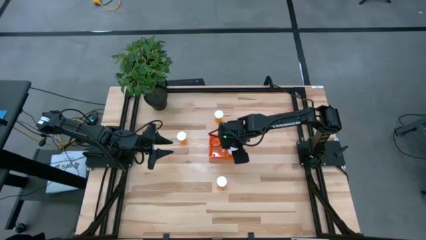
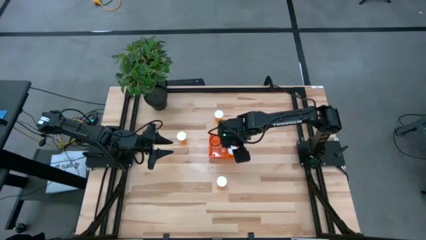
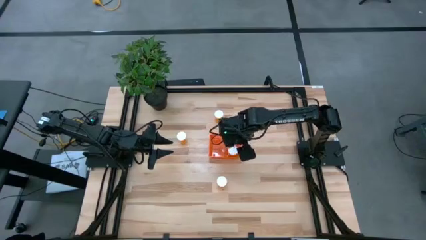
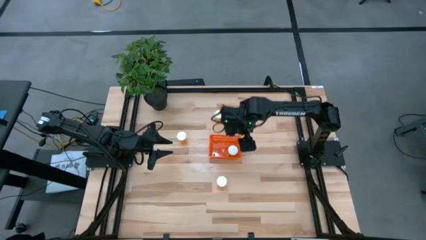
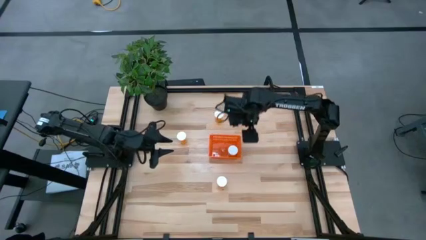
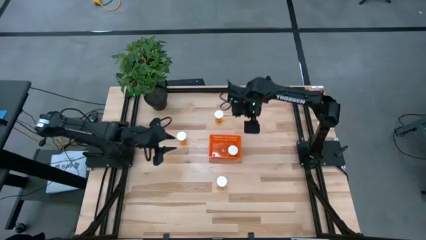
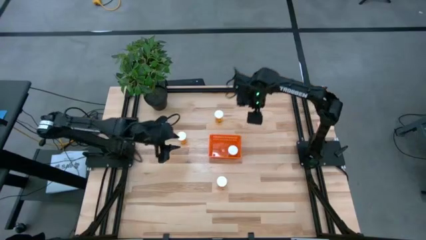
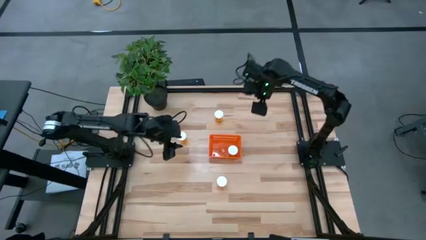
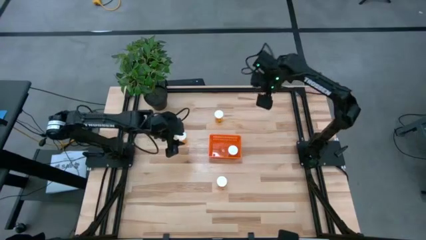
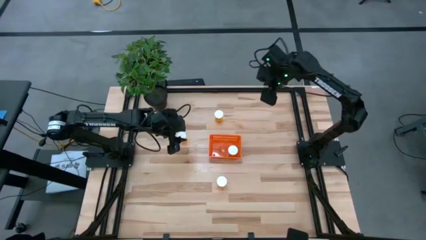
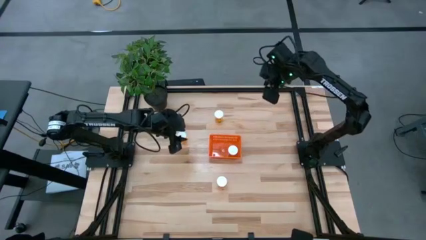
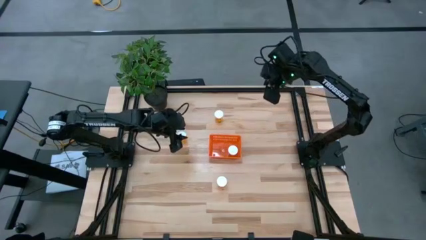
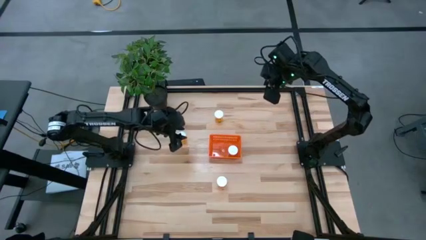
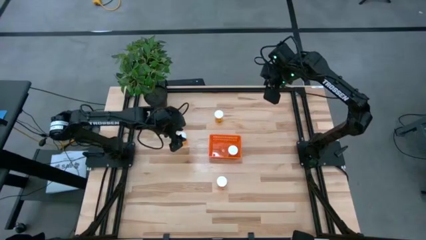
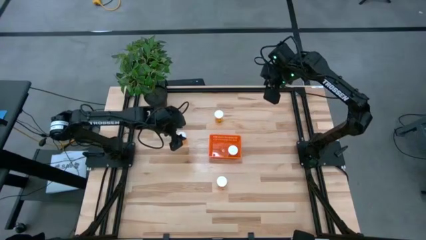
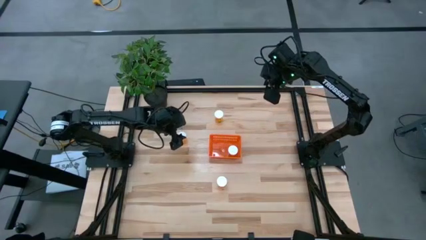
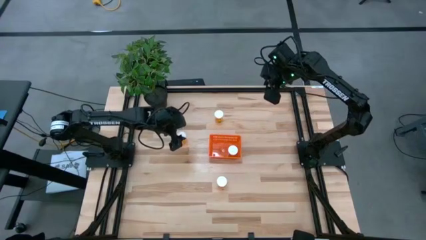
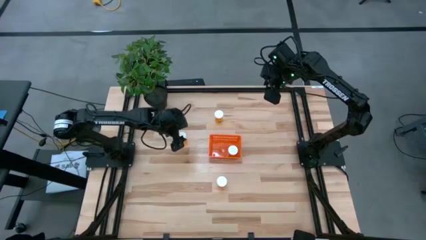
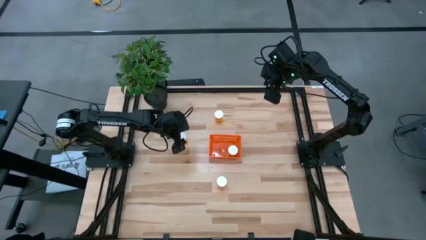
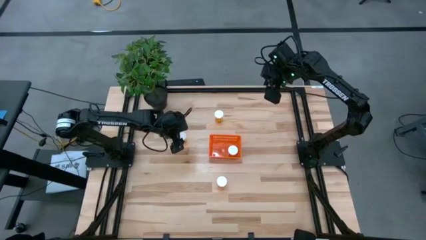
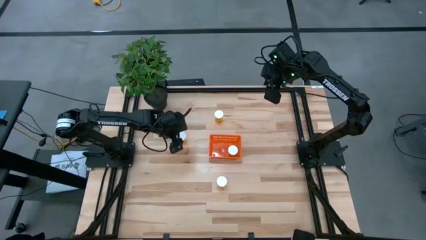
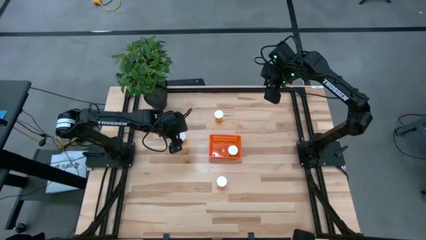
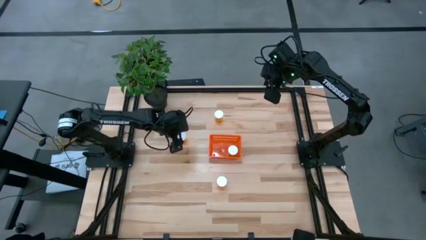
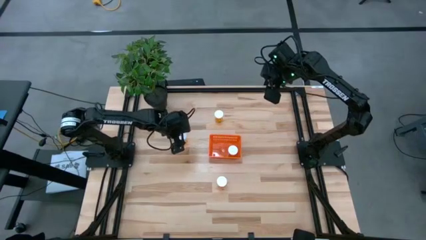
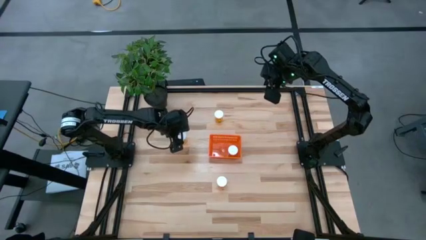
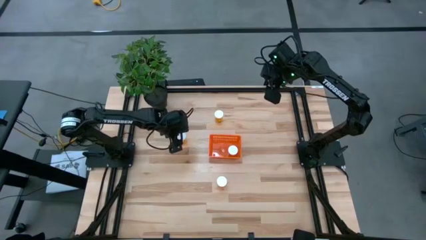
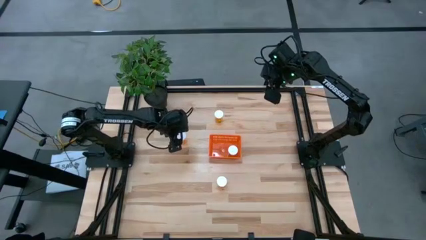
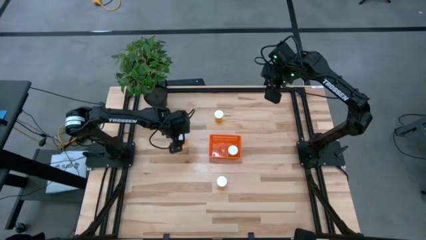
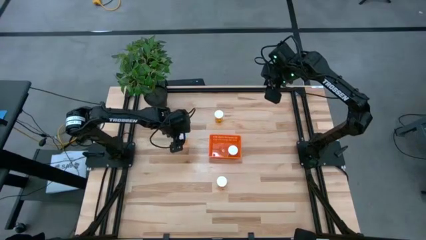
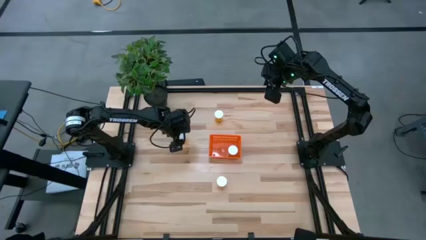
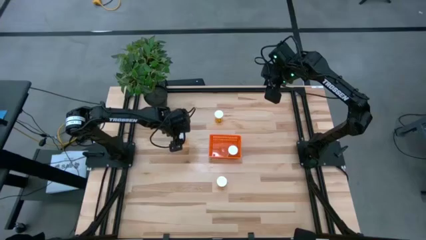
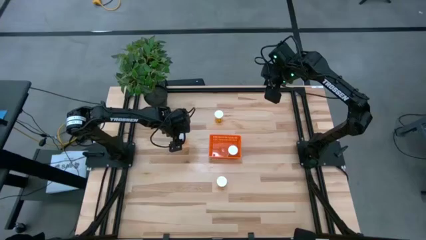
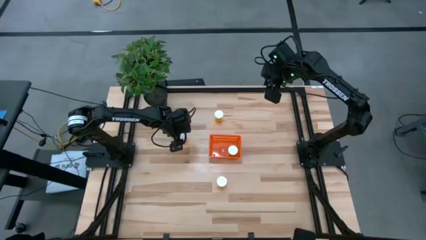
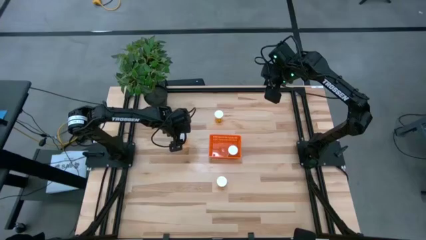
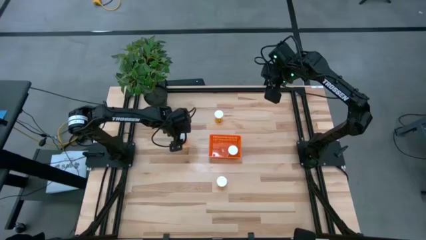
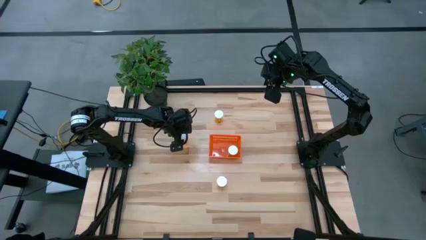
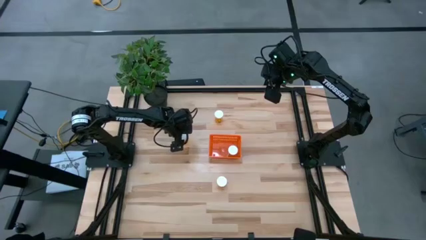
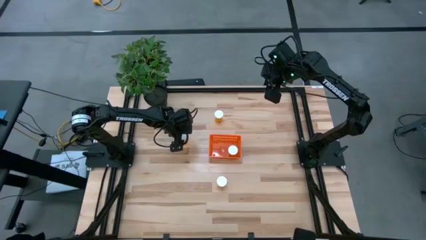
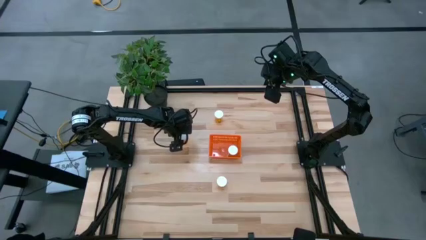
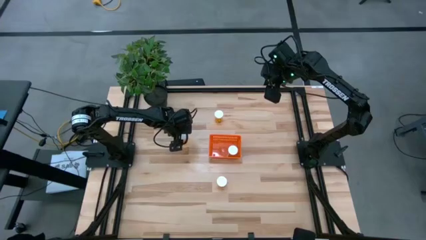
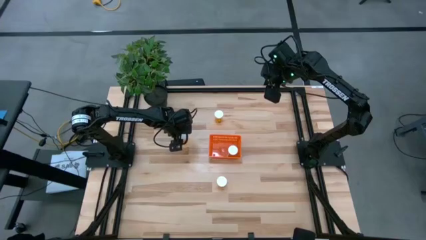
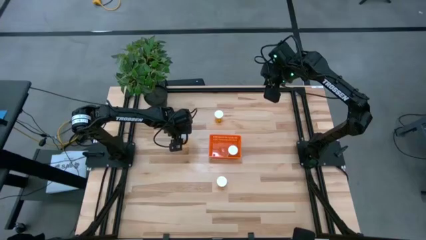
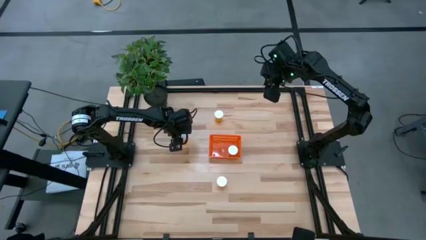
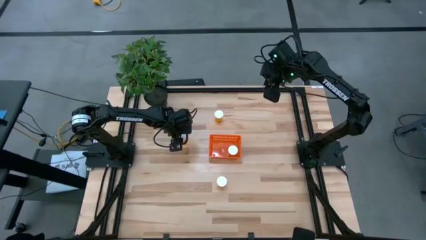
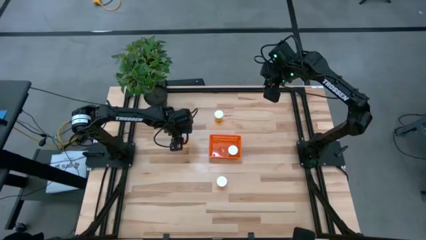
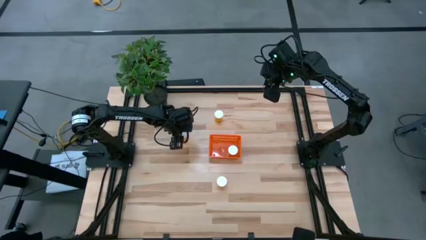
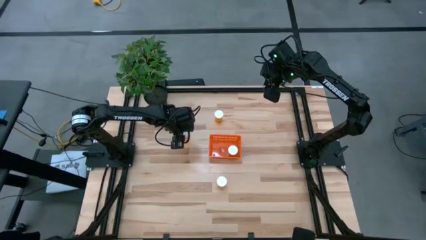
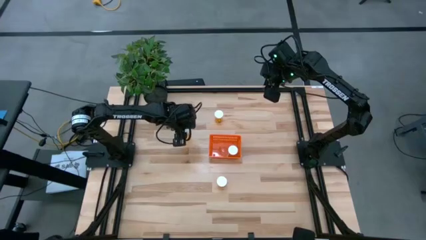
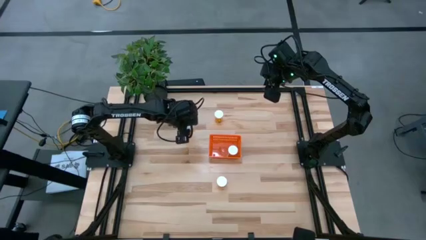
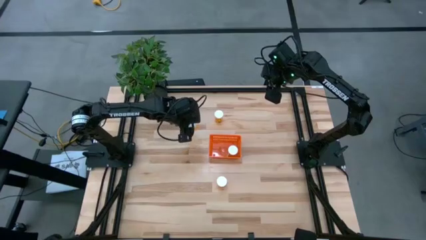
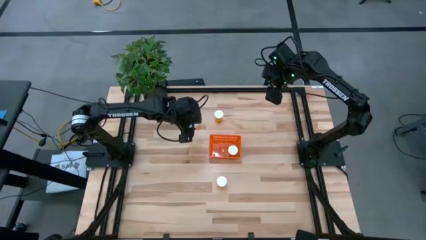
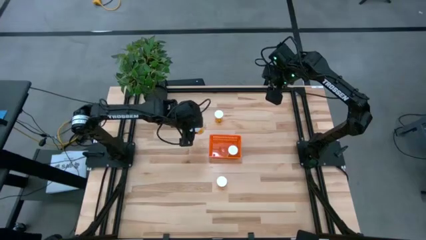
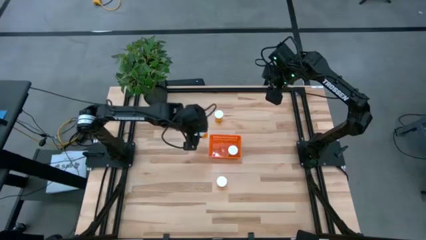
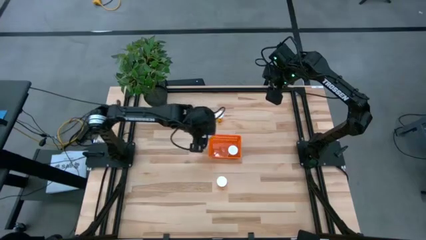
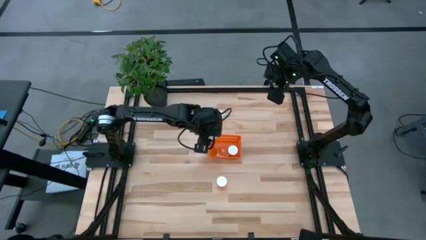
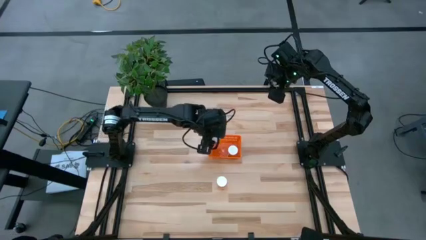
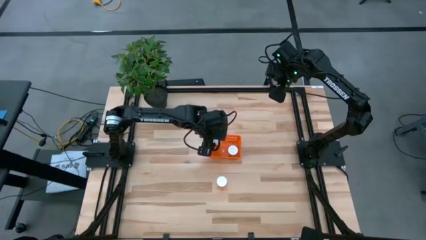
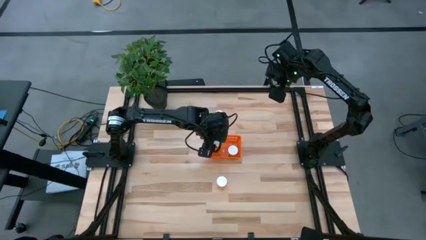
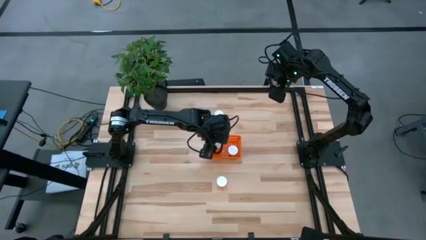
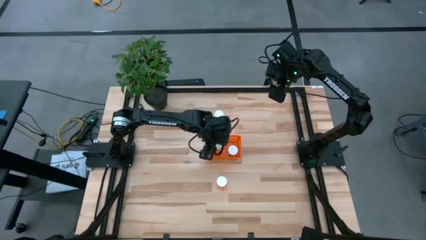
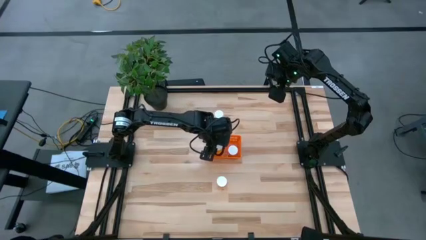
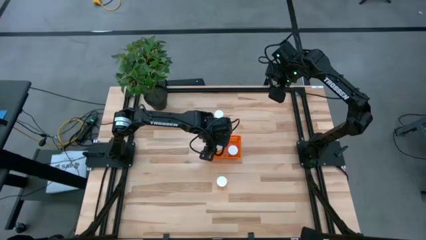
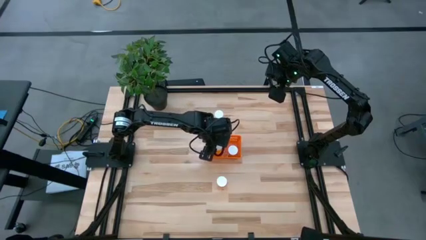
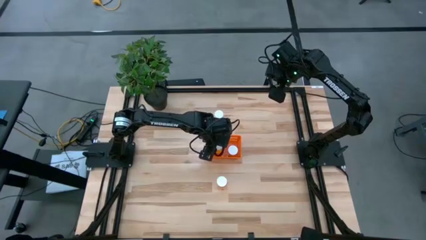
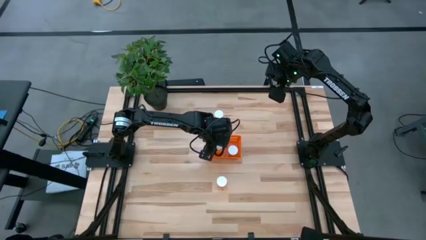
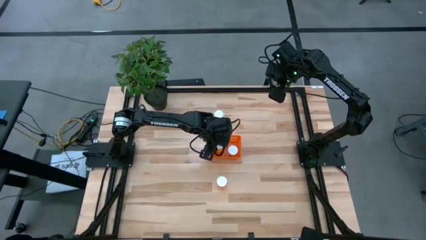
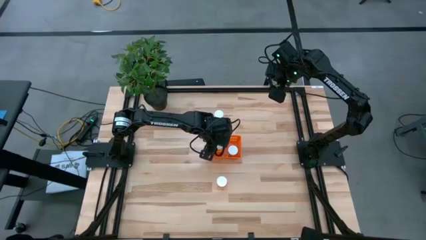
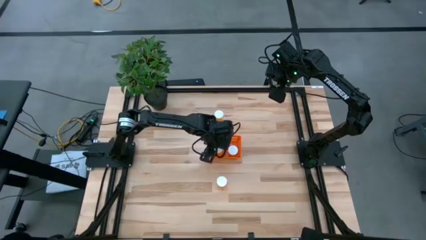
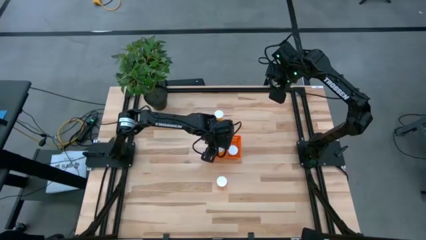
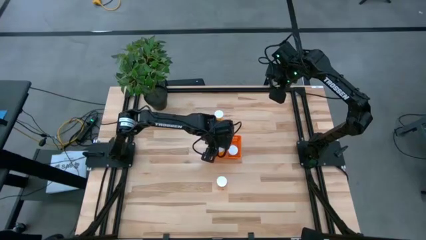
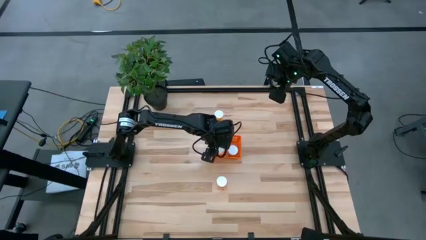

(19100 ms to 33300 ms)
Task: Pick and place pill bottles into a basket
Put the orange medicine bottle into the orange basket
